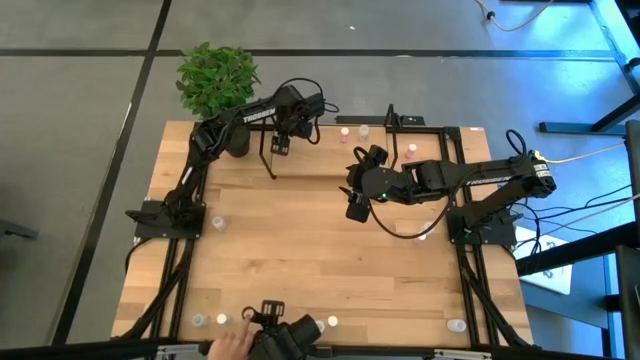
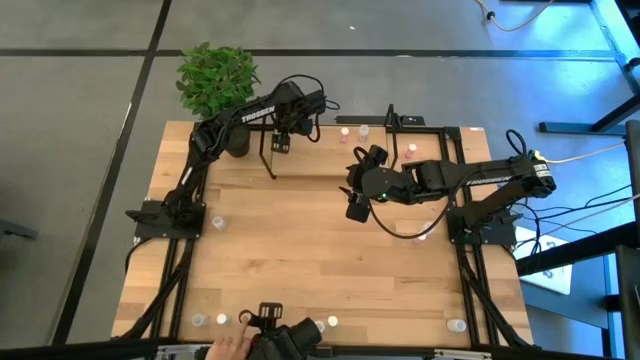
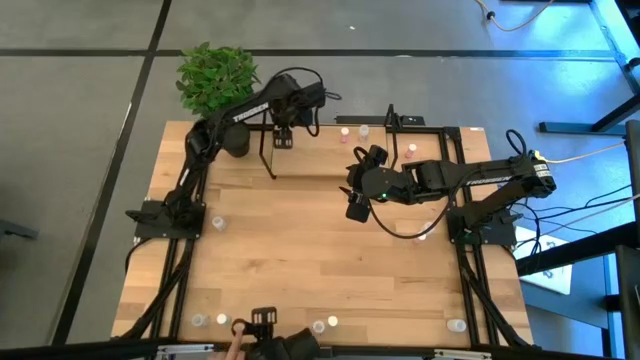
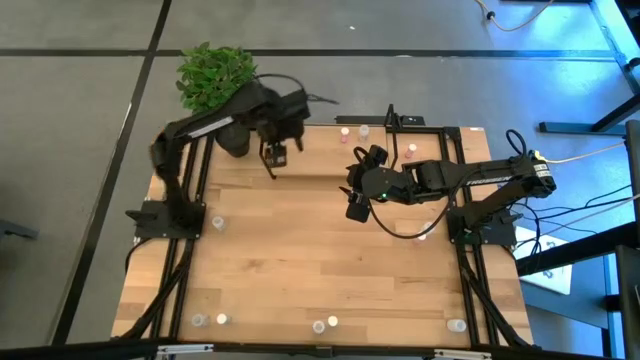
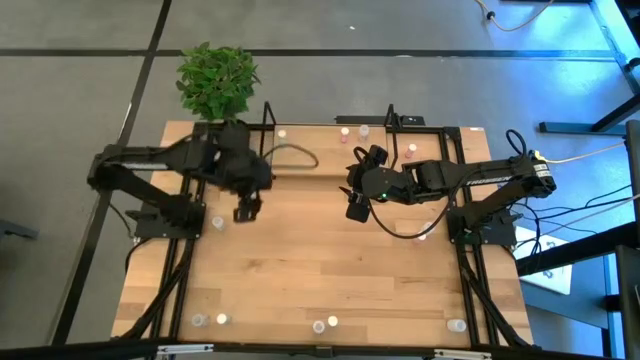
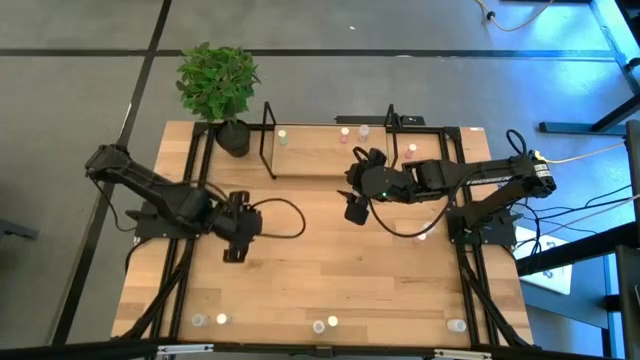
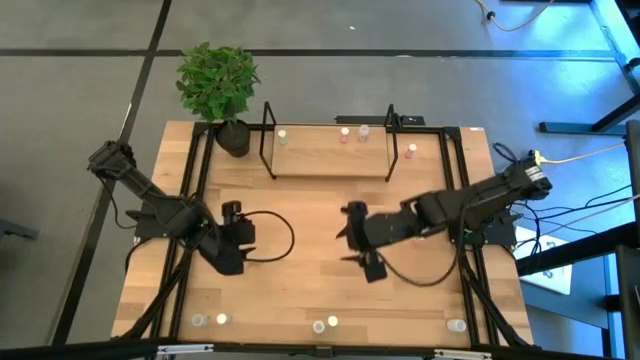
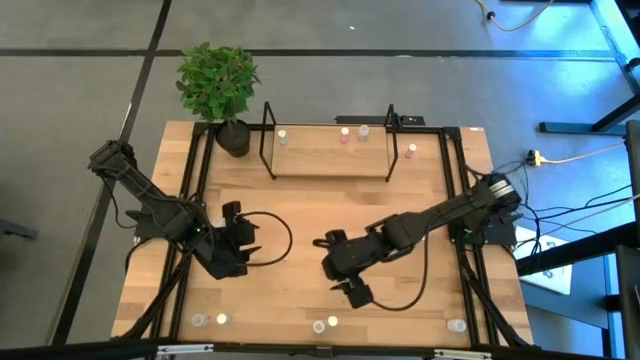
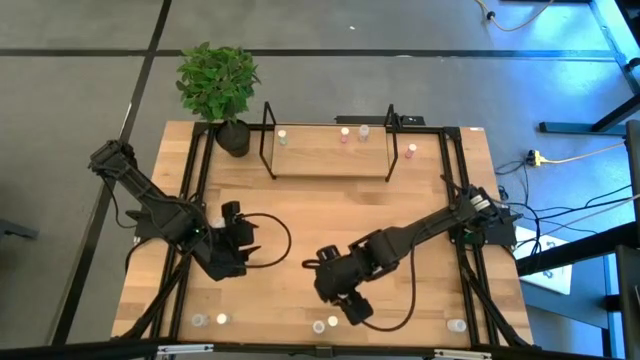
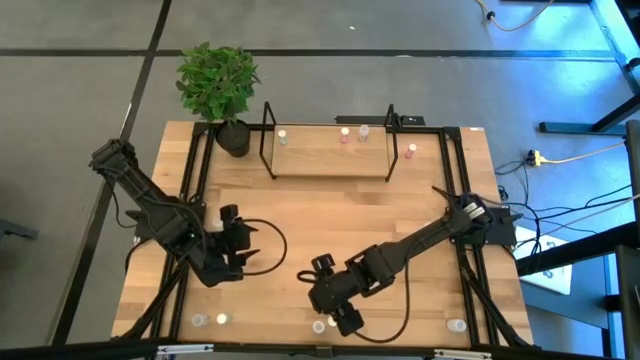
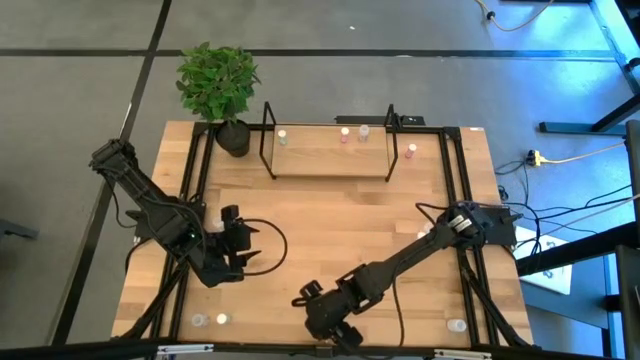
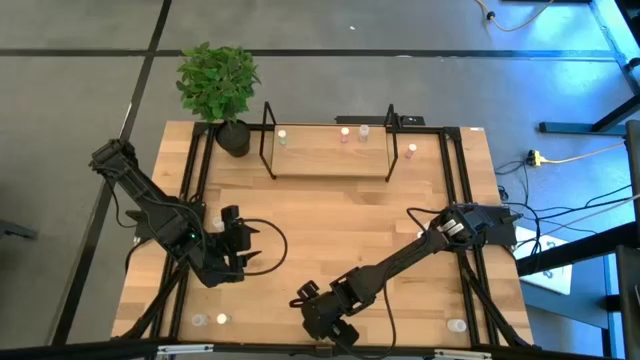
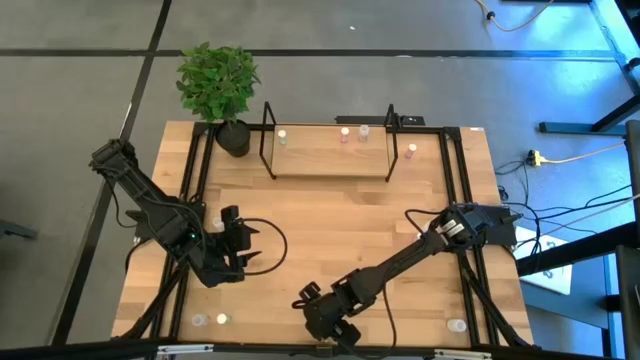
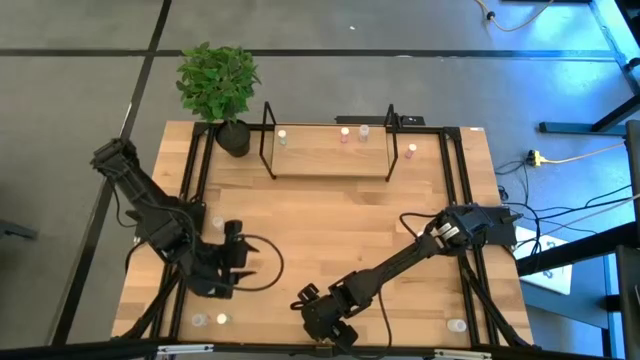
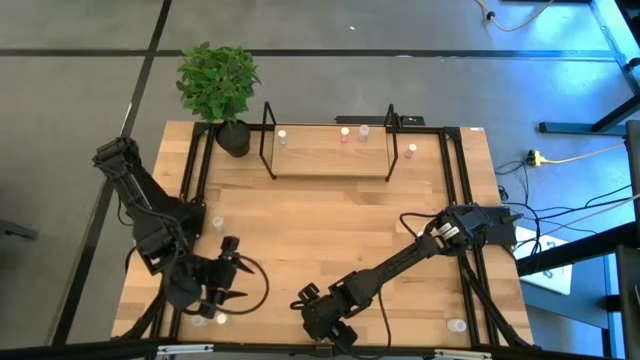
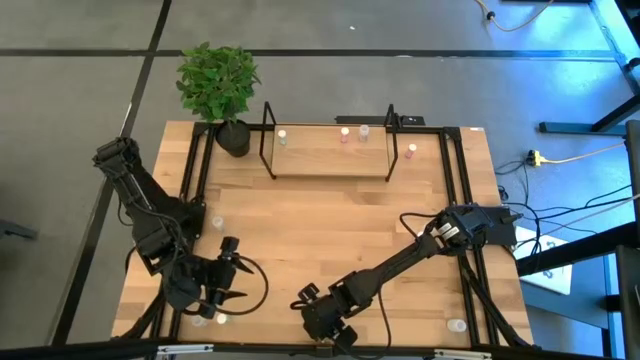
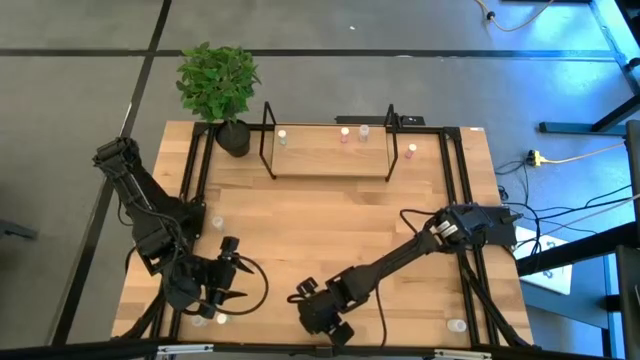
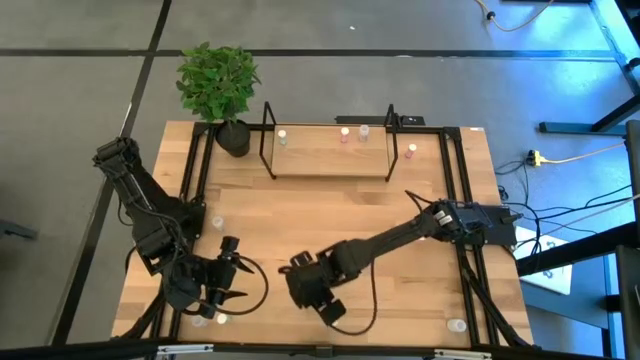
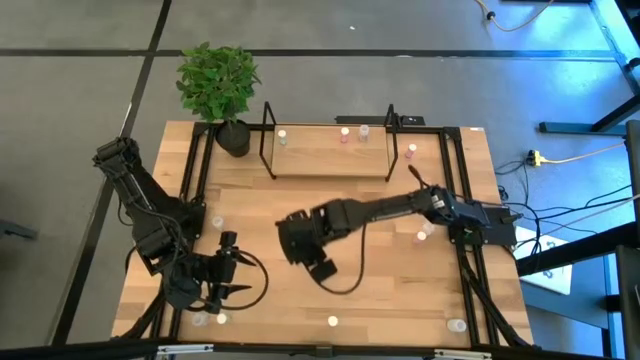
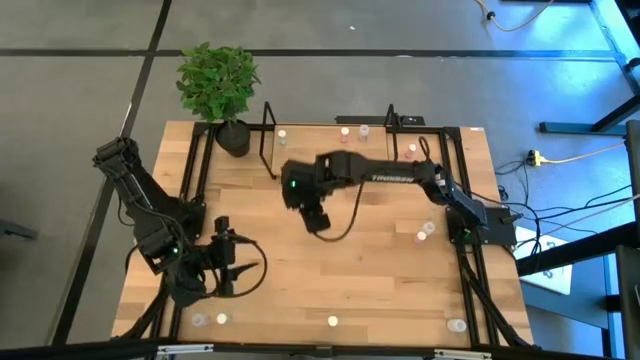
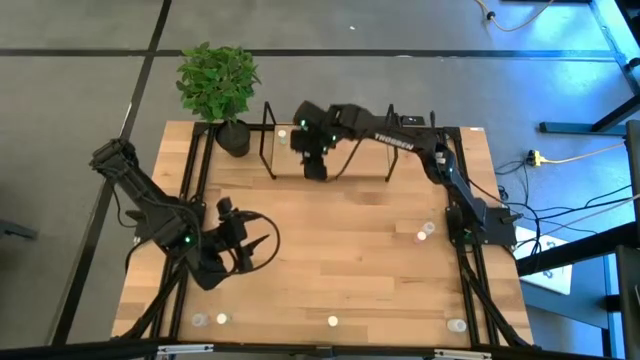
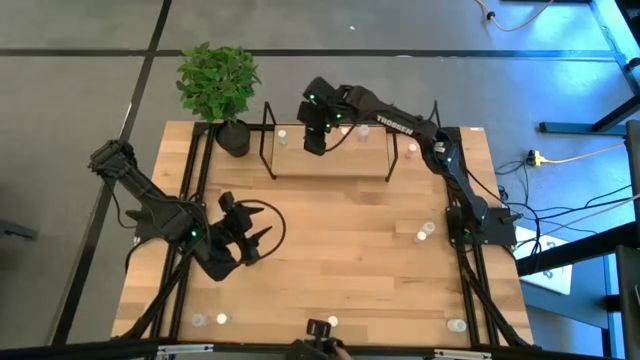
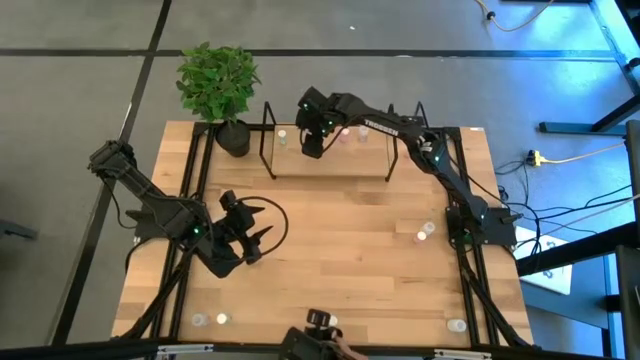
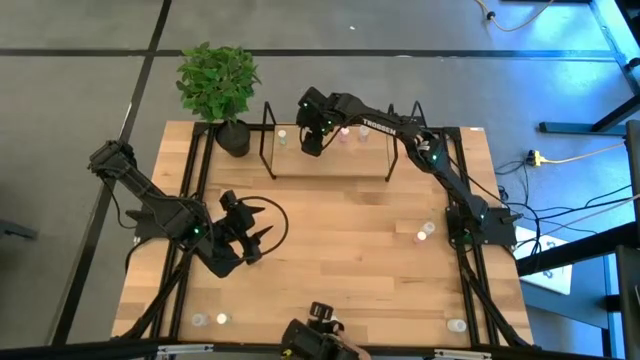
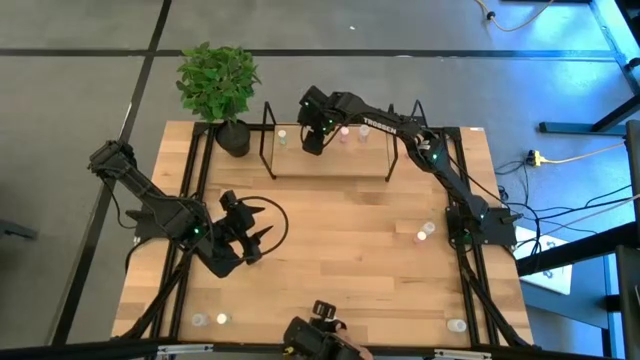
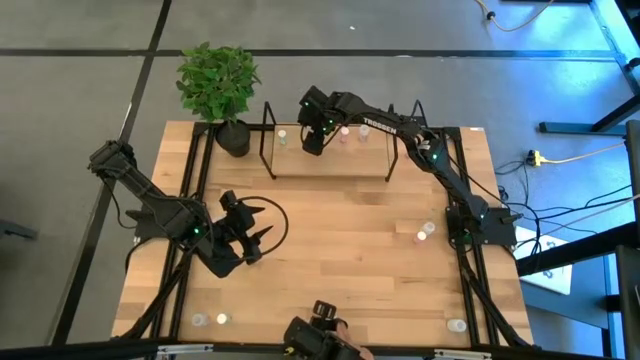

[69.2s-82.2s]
Task: Pick and place medicine bottles onto shelf by color
Put the bottom left white medicine bottle on the shelf

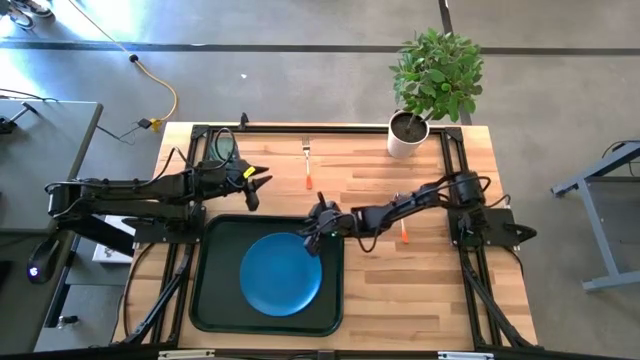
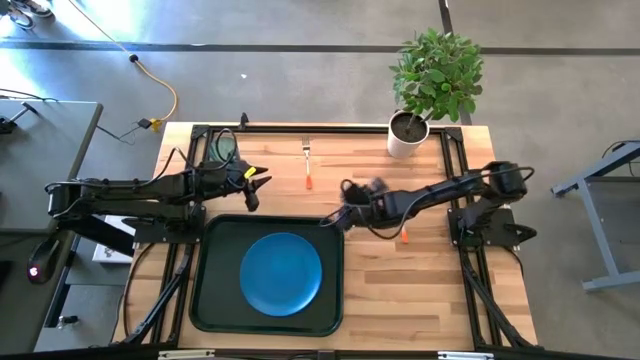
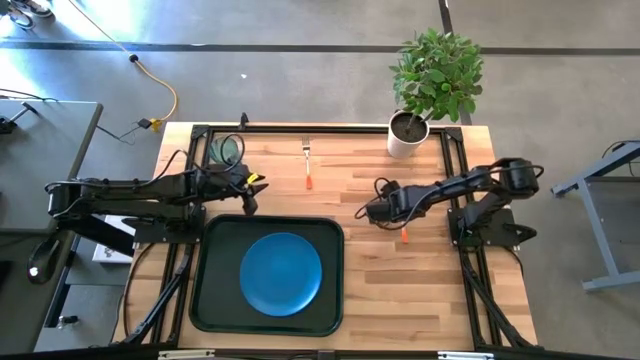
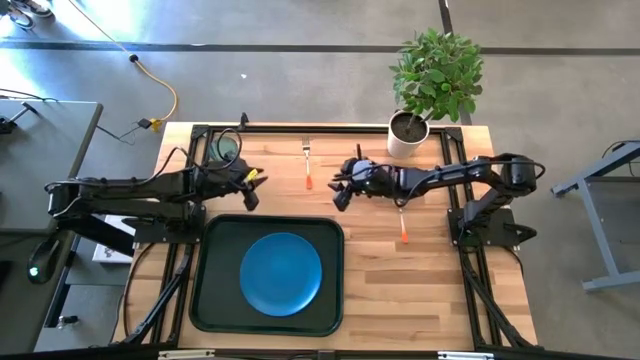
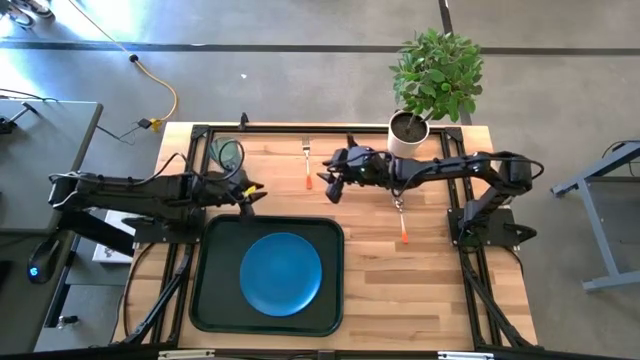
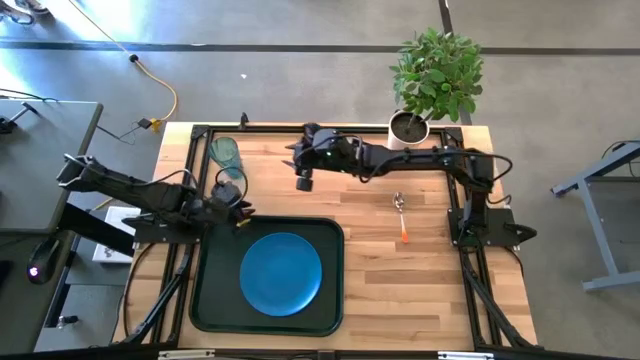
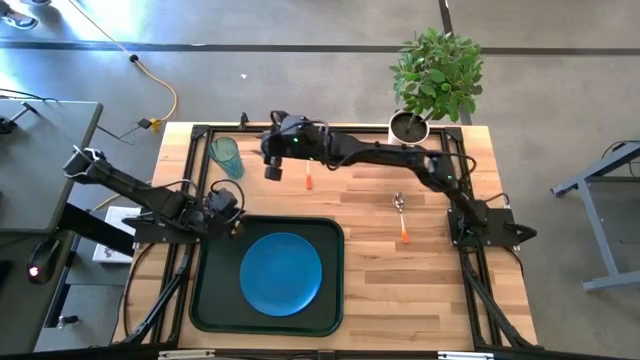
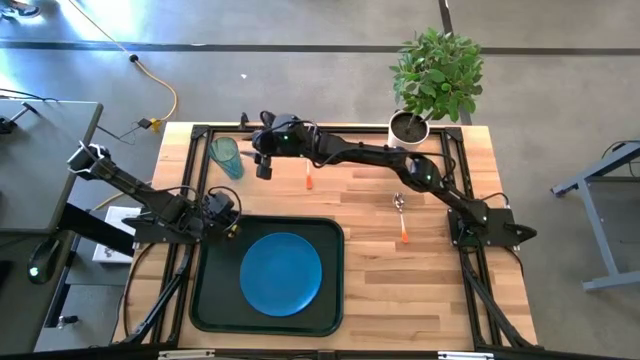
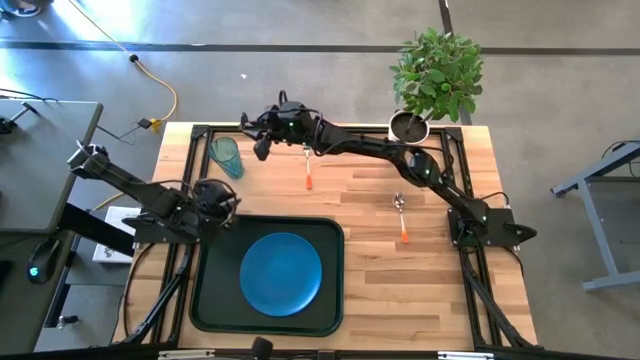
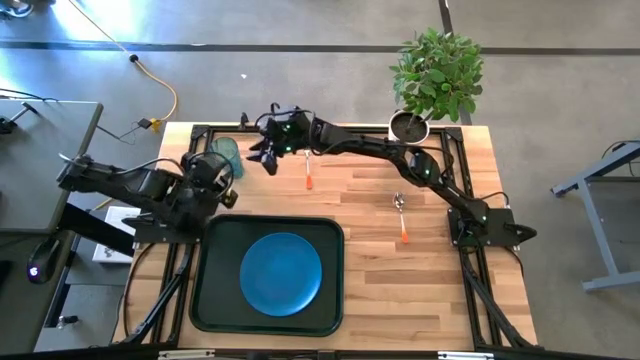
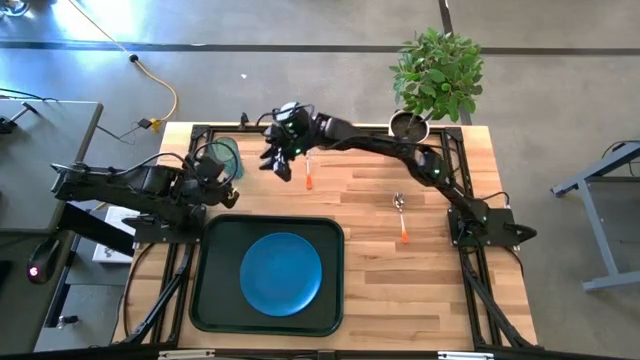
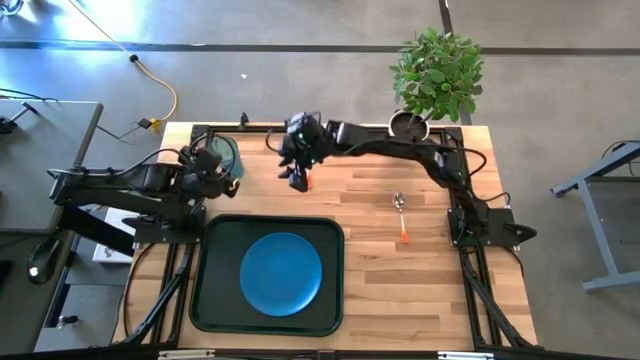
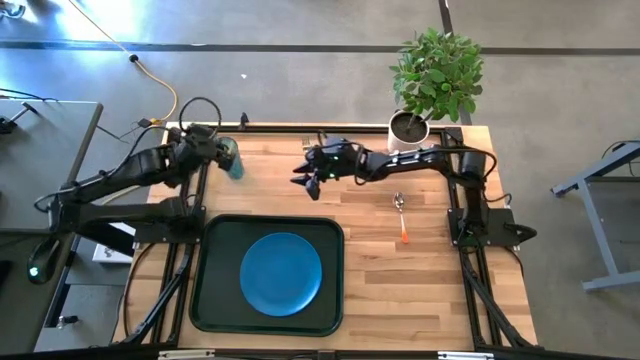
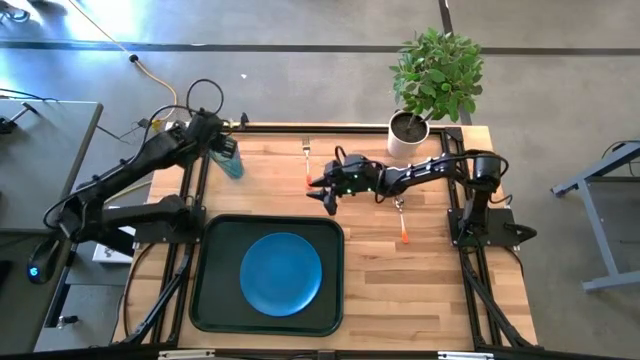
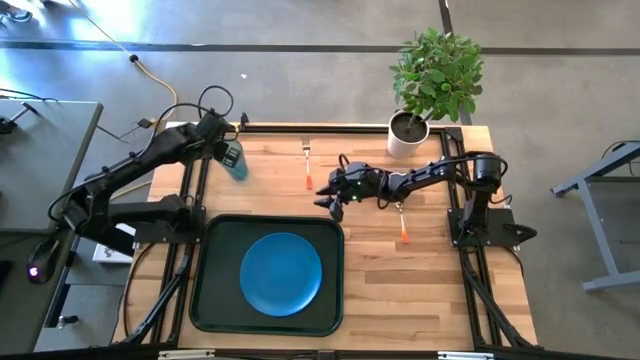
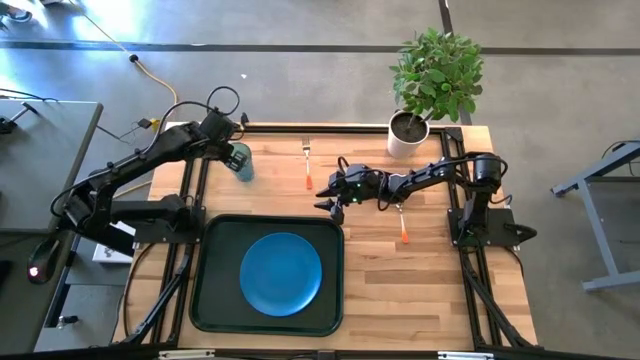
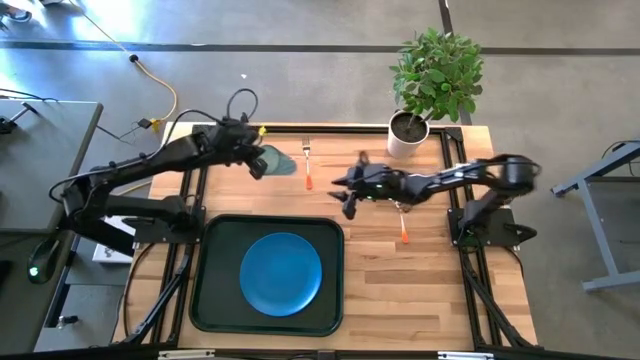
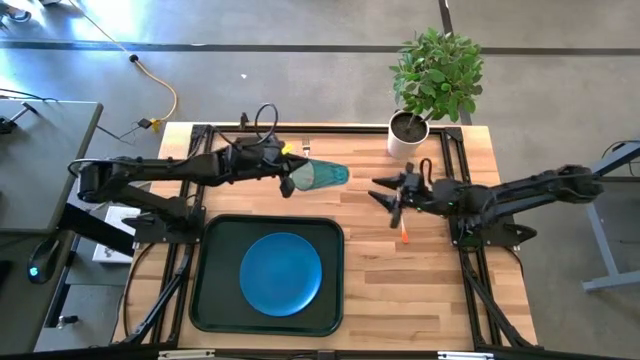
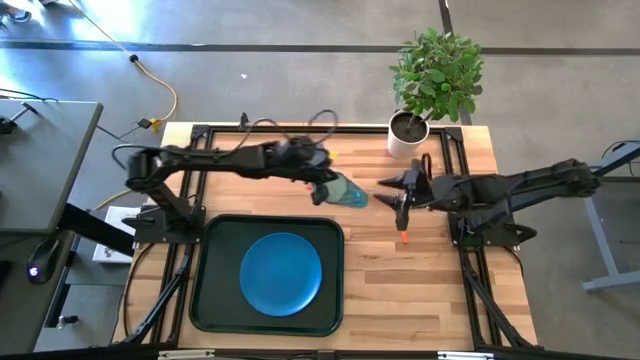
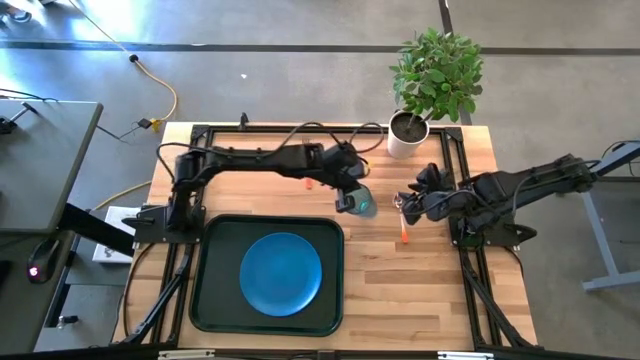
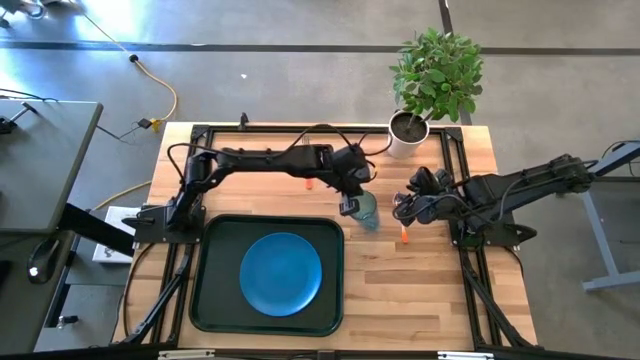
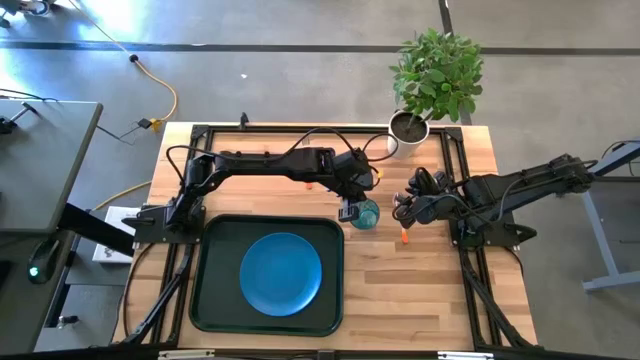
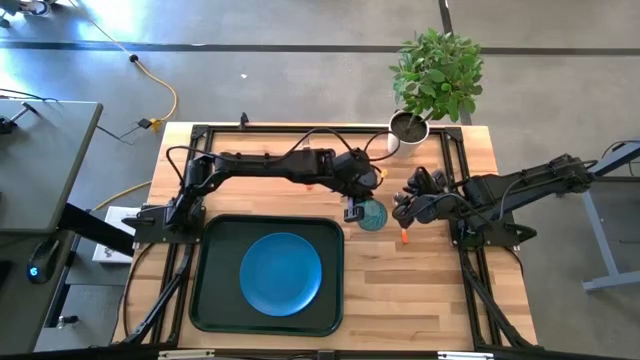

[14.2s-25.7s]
Task: Pick and place plate/cup/fork/spoon on tray
Put the blue cup on the black tray to the top right of the blue plate
